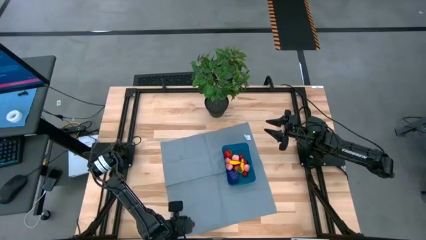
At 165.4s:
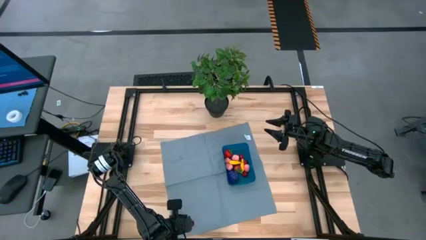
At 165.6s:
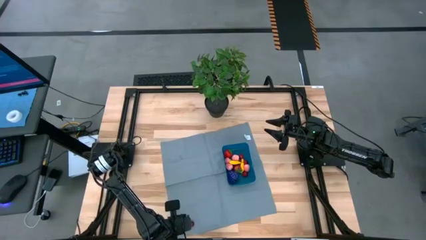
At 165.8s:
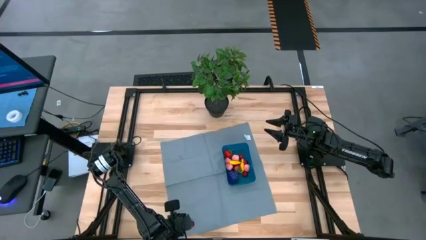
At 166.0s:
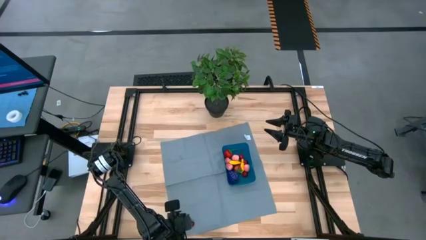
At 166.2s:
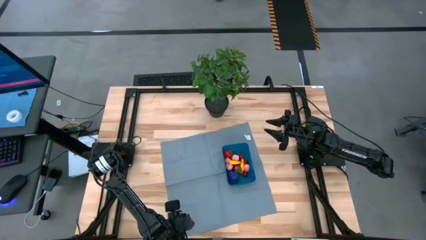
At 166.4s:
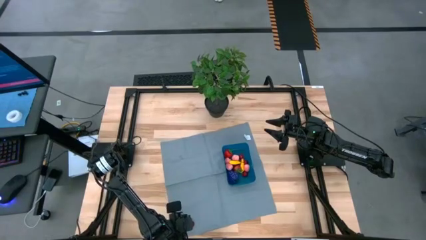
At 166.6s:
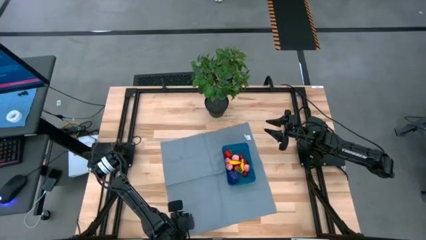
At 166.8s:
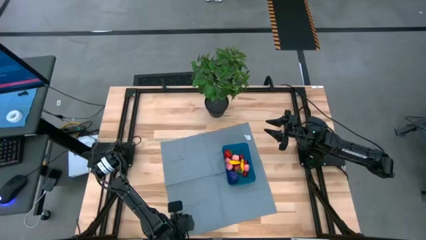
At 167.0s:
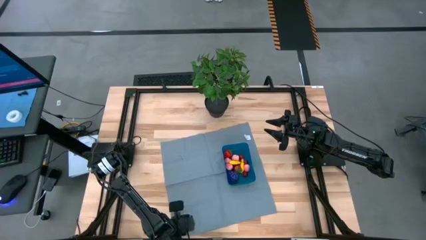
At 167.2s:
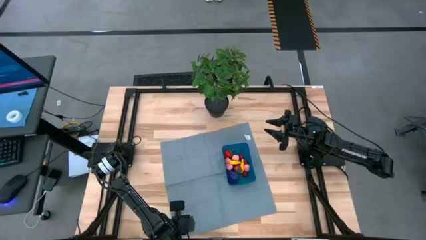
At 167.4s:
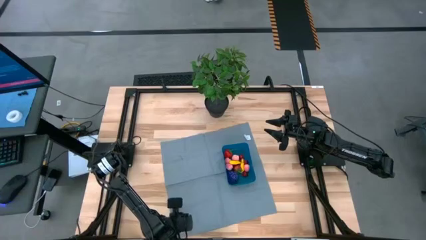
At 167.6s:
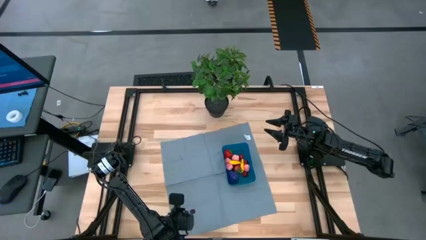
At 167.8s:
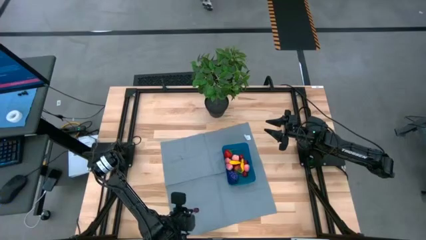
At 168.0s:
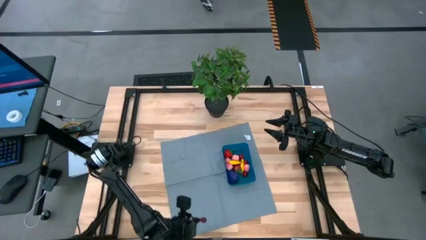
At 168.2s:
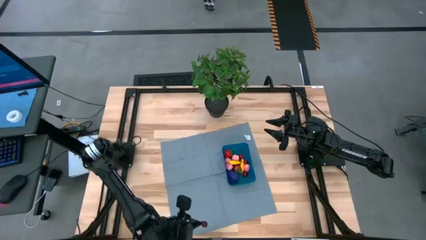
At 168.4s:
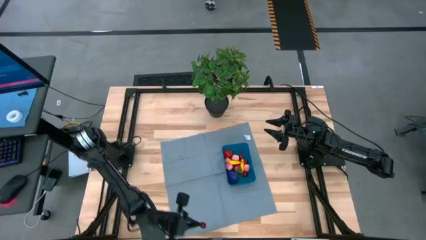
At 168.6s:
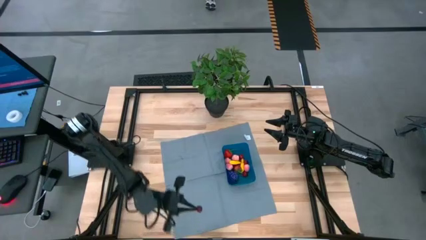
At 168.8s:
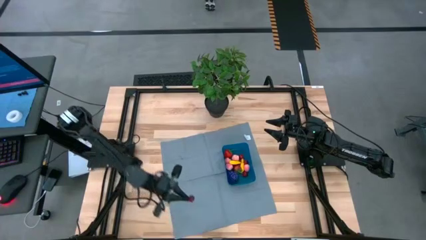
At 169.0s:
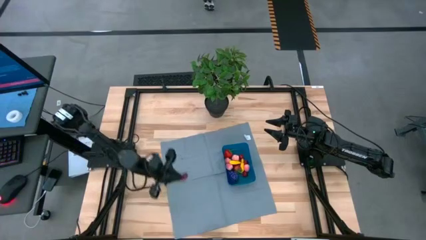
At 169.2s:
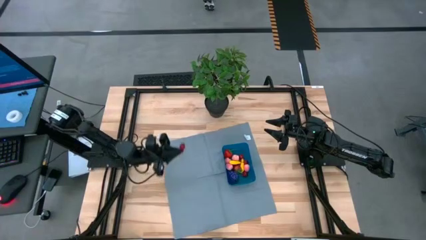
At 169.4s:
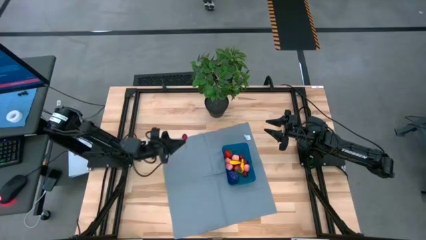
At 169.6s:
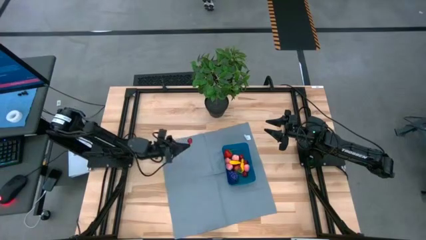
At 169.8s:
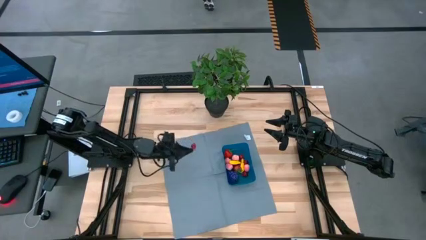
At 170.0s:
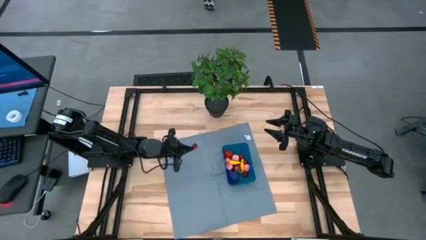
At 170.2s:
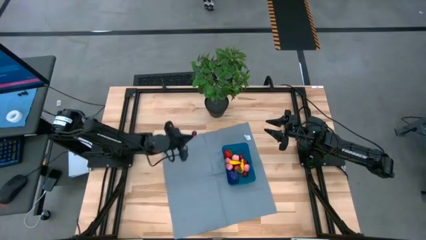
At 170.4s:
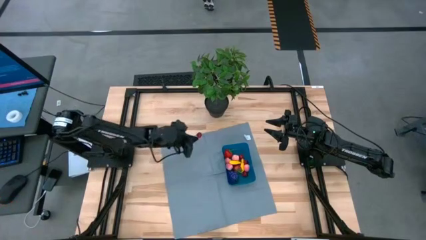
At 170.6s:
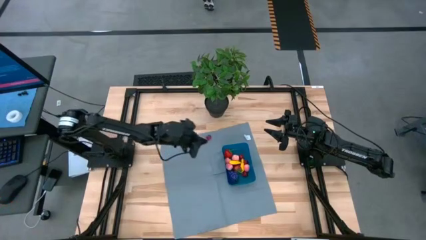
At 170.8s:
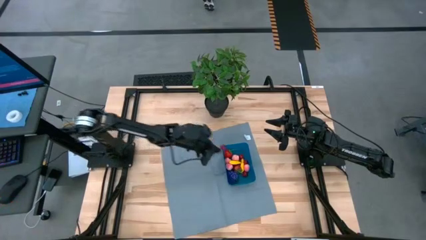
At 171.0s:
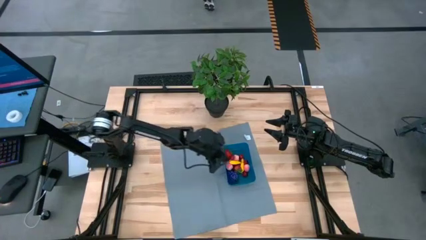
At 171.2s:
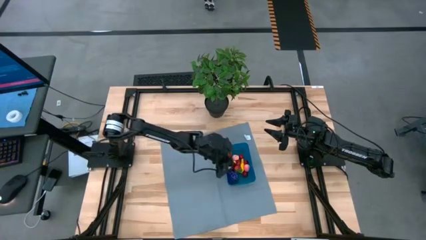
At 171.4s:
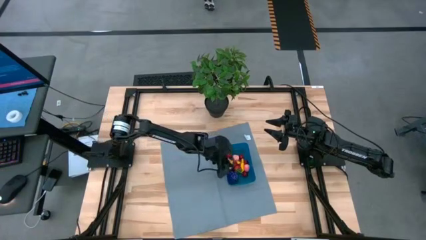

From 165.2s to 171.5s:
Task: Pick and placing Produce into tupperware
Put the red cherry into the bin

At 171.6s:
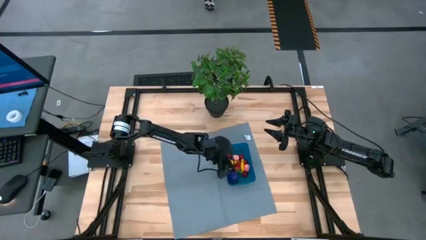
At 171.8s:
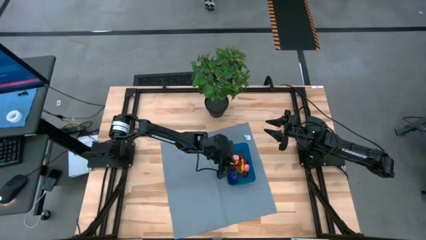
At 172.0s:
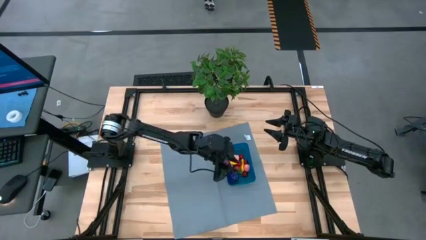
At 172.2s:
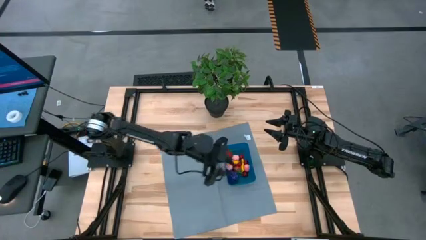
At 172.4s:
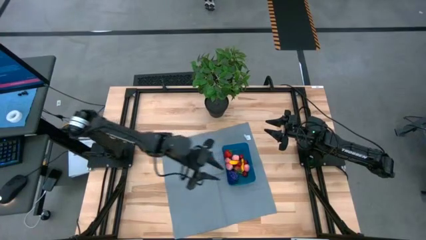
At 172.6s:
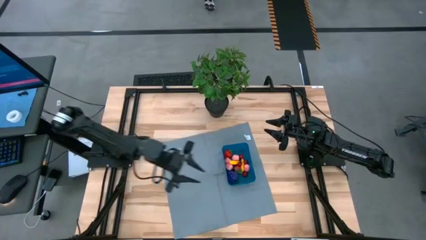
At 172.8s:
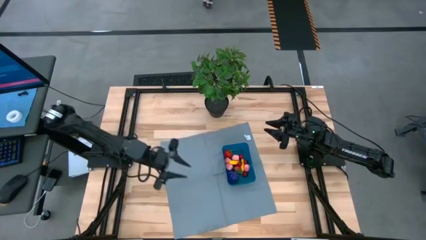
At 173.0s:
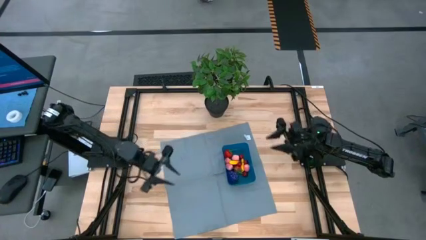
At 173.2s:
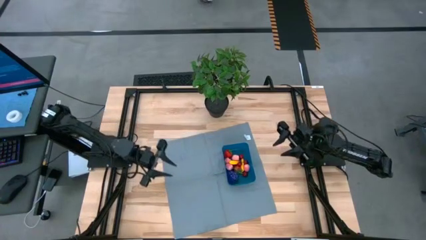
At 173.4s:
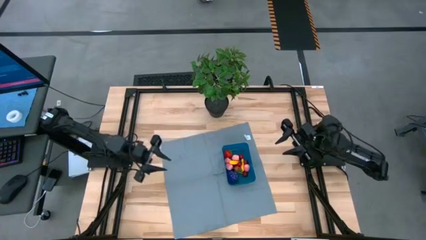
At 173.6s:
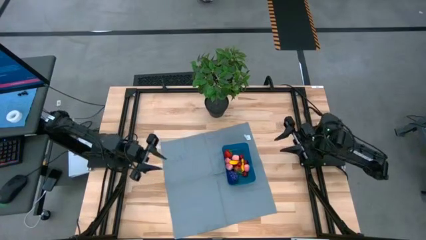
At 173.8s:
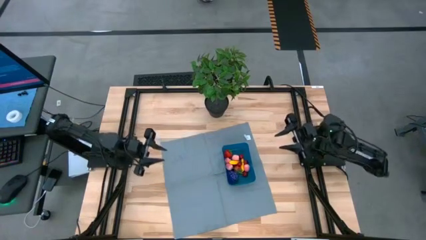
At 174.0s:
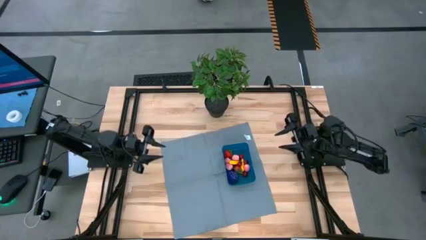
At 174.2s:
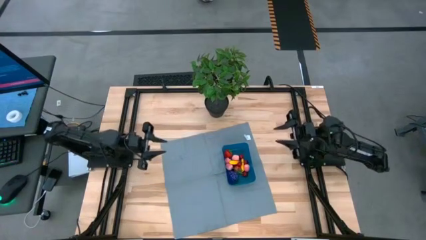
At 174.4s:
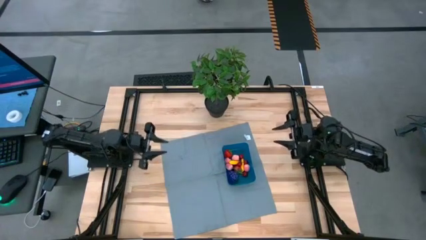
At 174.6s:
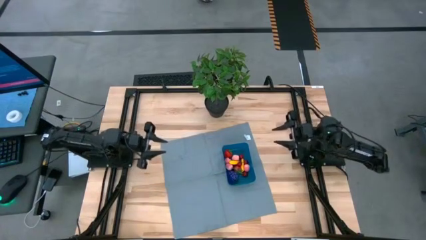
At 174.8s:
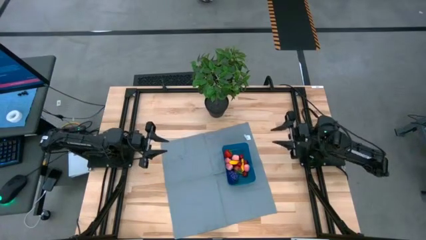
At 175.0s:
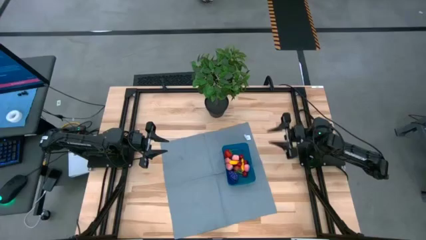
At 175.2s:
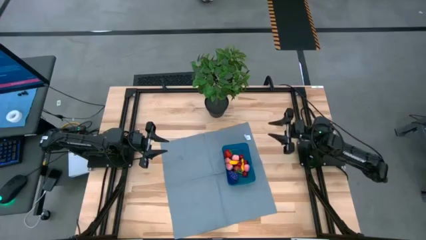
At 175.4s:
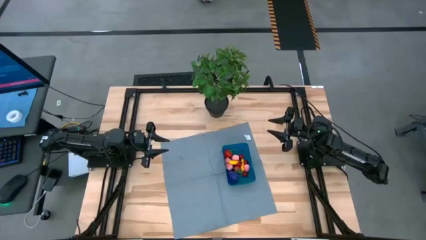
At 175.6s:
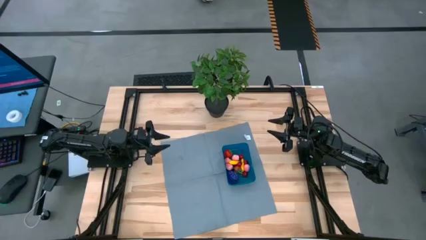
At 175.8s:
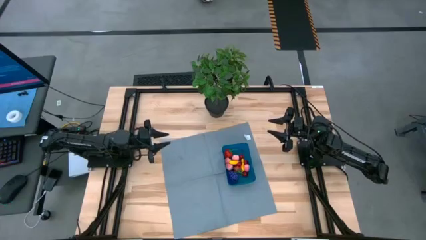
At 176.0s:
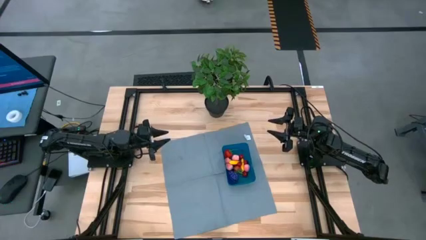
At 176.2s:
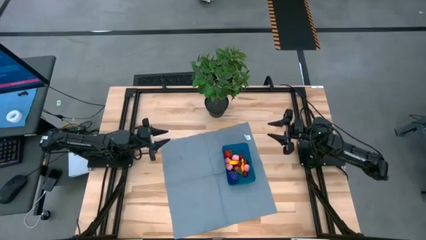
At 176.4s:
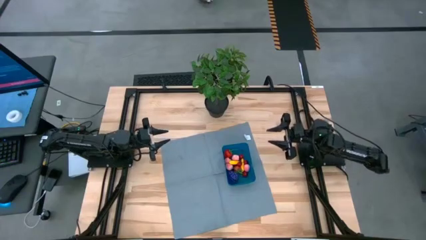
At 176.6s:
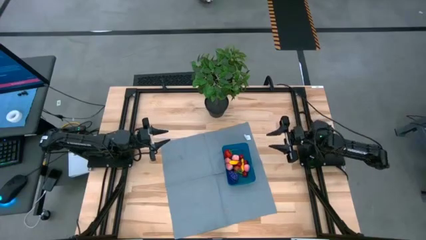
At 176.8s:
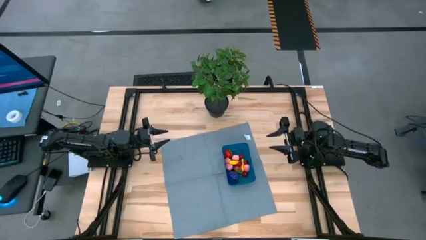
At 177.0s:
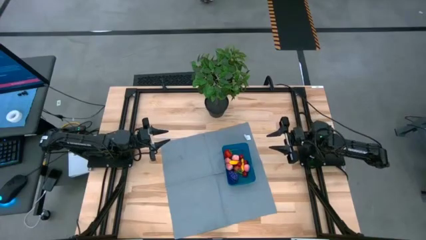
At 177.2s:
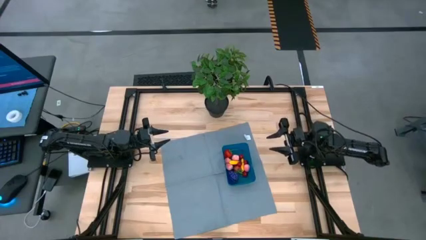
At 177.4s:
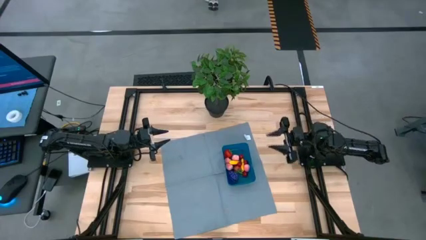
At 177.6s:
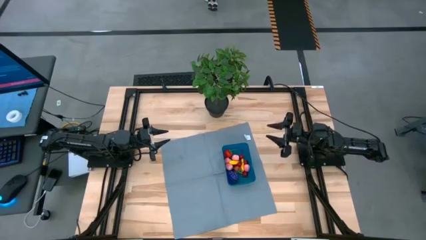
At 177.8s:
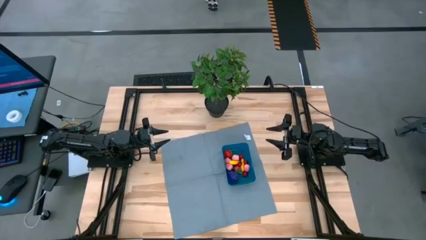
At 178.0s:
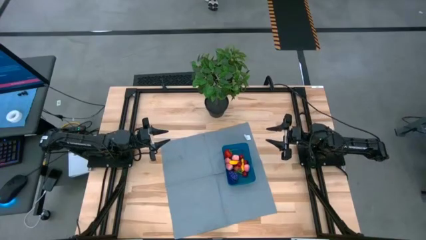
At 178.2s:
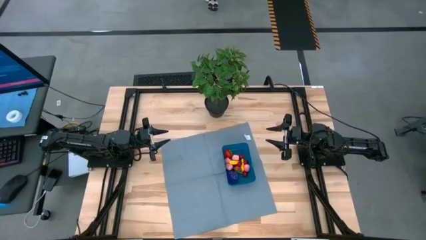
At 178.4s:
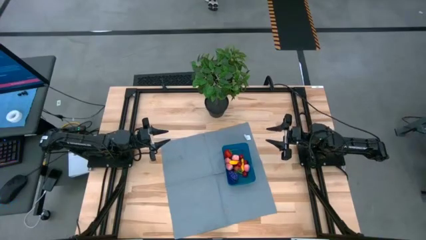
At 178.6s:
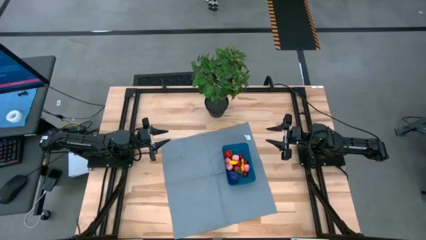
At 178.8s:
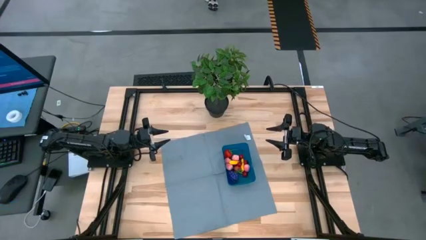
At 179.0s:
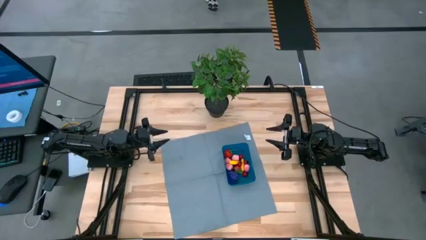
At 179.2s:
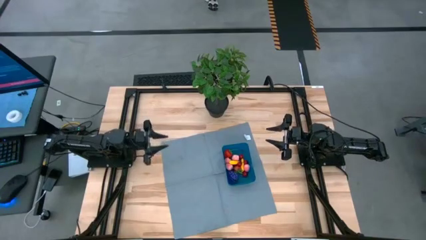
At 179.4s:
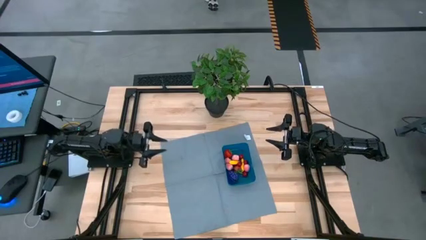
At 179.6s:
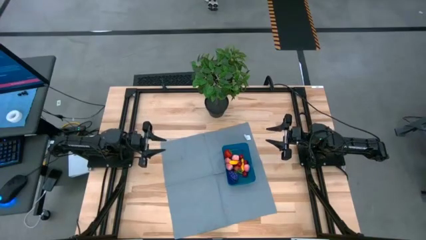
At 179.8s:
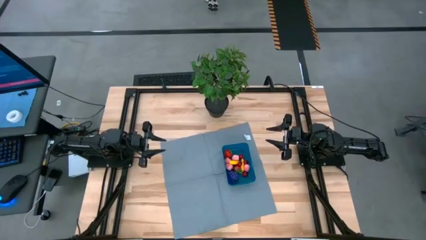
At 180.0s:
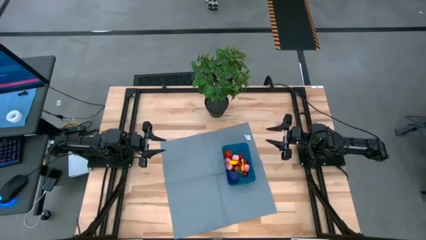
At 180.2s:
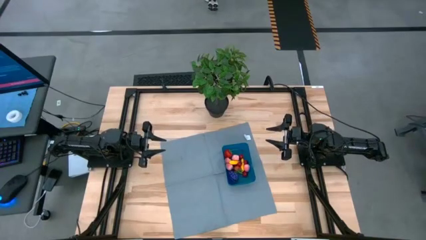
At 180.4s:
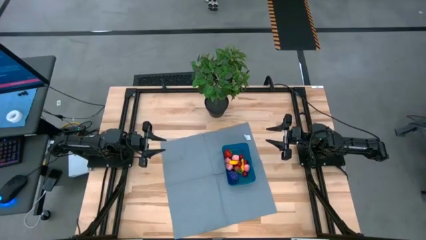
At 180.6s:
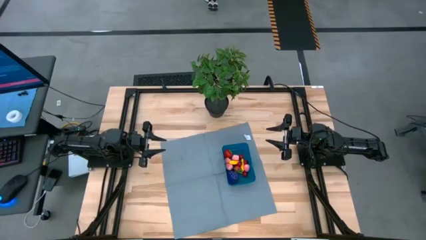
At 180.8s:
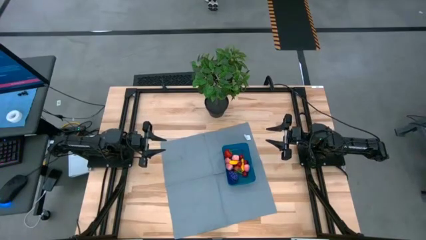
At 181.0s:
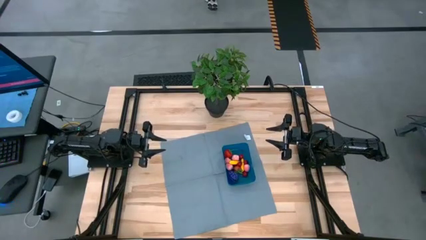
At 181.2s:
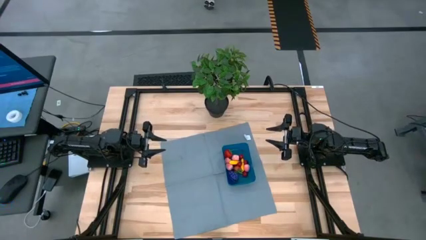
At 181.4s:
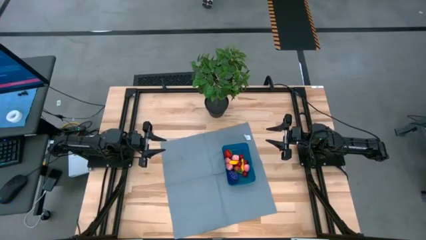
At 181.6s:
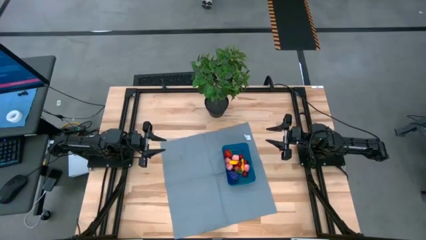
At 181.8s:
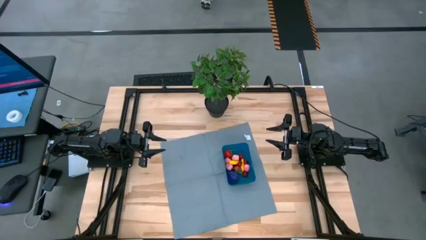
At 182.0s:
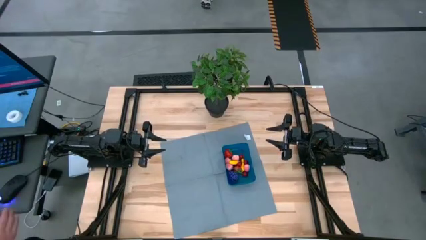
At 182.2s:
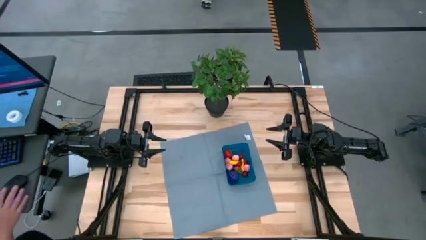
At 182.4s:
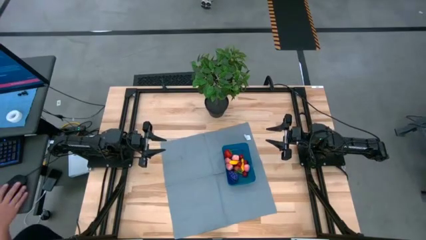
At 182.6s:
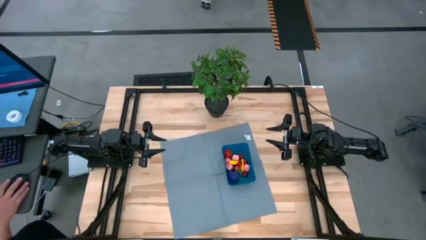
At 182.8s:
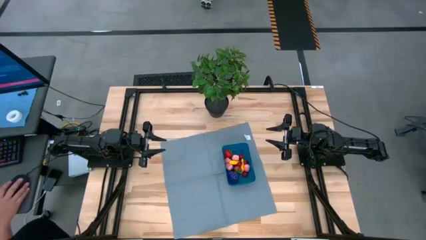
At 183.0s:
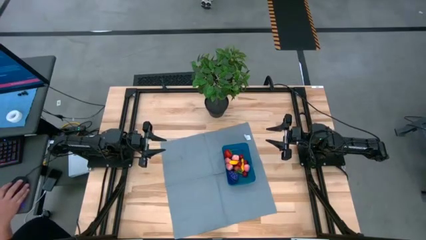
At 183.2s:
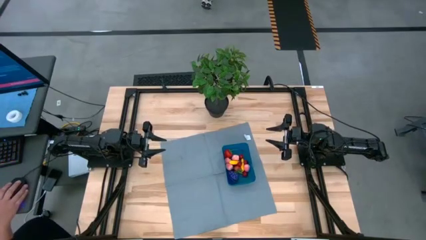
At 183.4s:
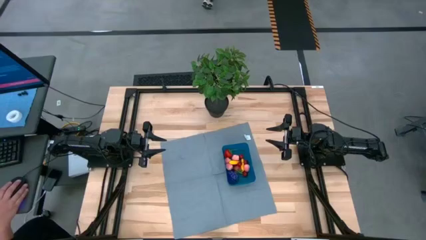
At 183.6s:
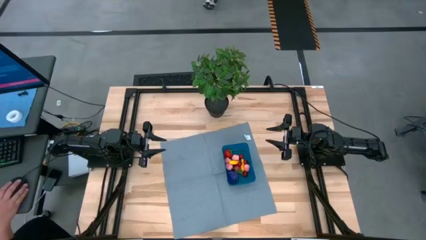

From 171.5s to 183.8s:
Return to Home Position
